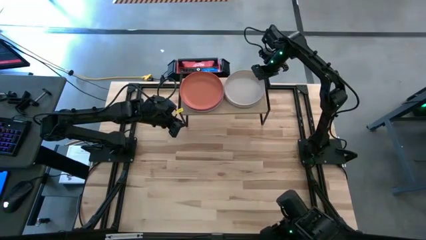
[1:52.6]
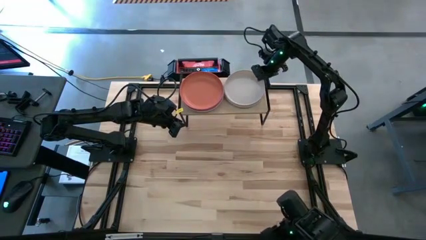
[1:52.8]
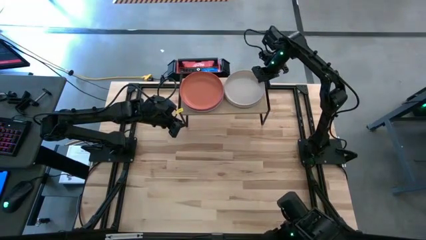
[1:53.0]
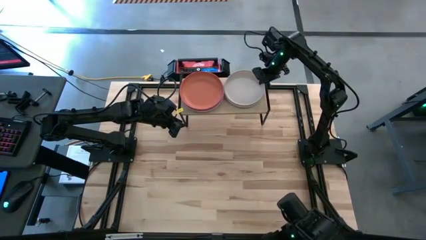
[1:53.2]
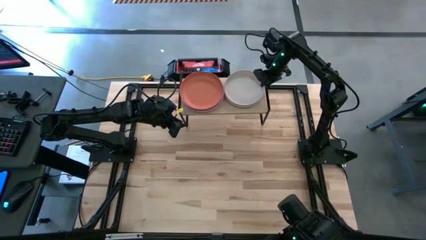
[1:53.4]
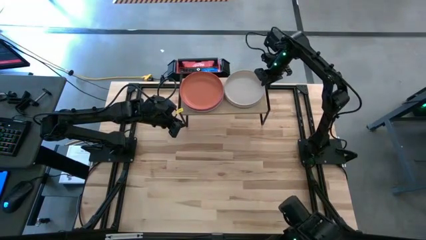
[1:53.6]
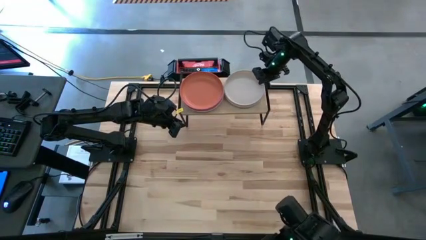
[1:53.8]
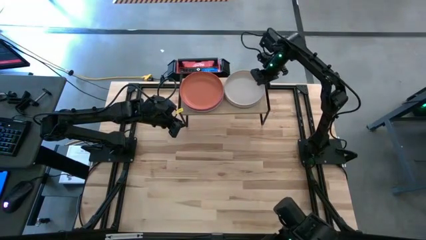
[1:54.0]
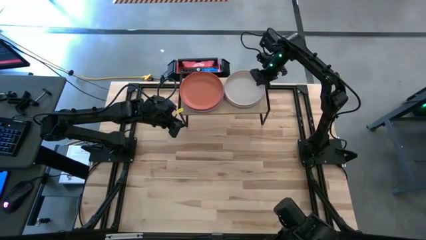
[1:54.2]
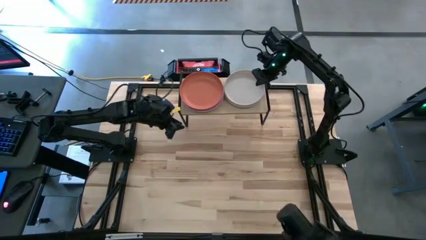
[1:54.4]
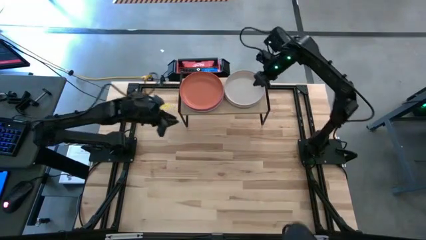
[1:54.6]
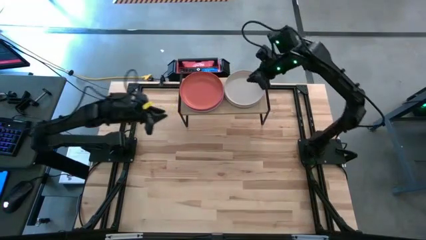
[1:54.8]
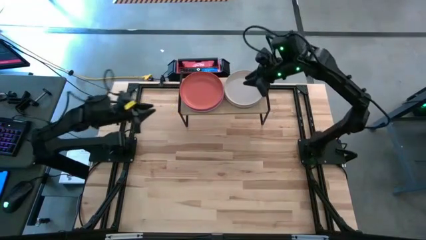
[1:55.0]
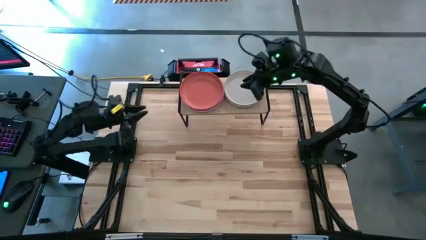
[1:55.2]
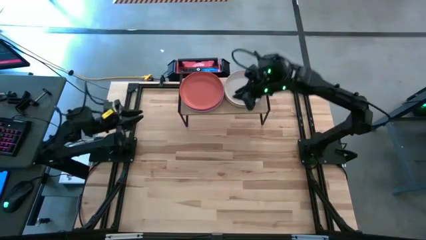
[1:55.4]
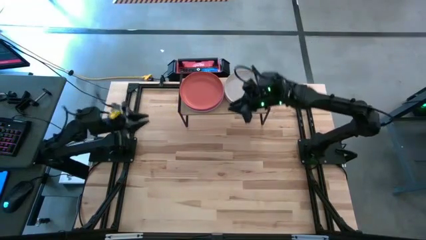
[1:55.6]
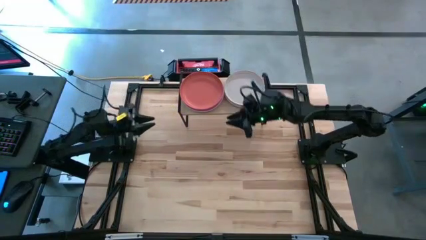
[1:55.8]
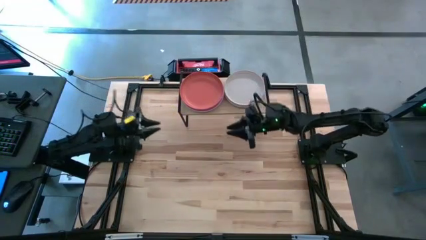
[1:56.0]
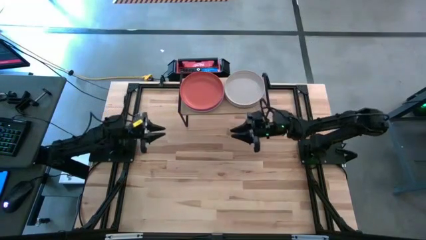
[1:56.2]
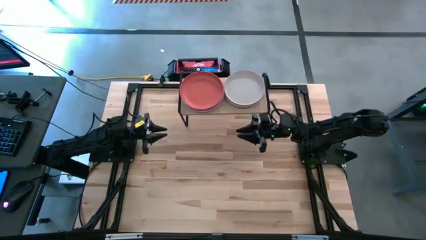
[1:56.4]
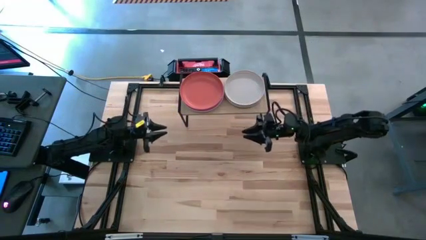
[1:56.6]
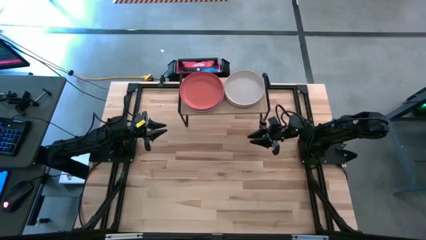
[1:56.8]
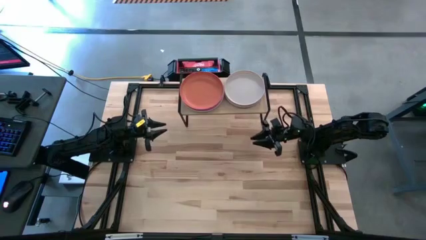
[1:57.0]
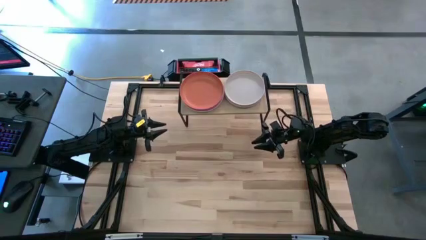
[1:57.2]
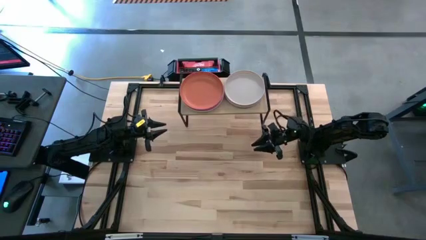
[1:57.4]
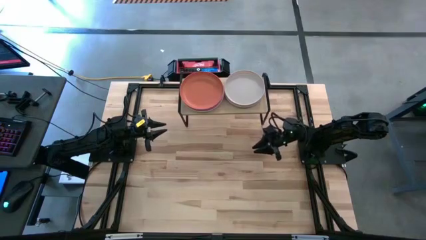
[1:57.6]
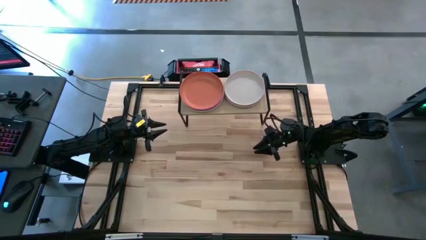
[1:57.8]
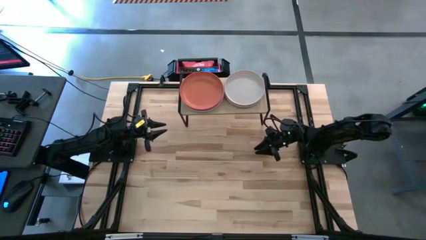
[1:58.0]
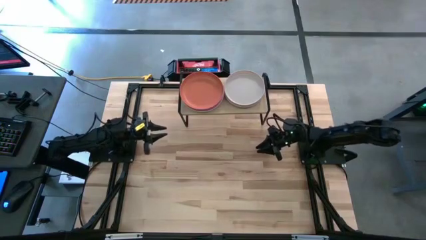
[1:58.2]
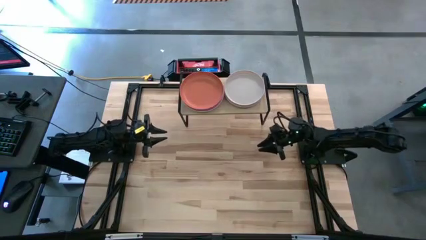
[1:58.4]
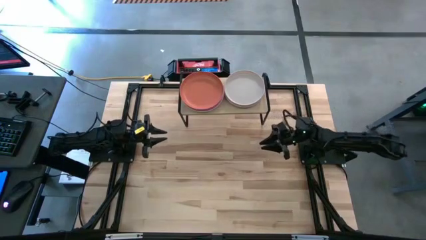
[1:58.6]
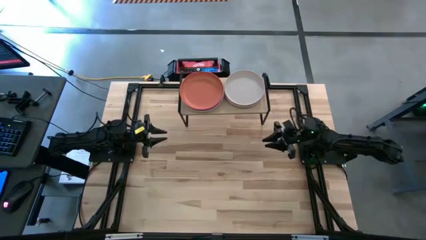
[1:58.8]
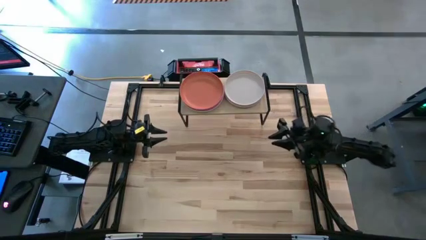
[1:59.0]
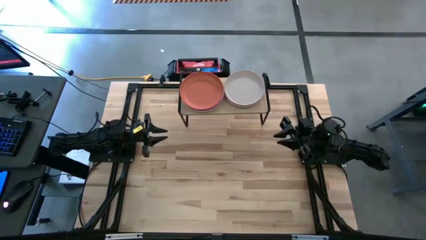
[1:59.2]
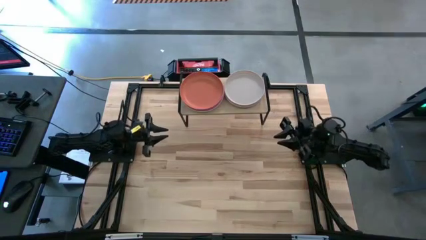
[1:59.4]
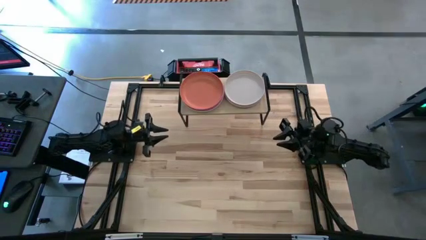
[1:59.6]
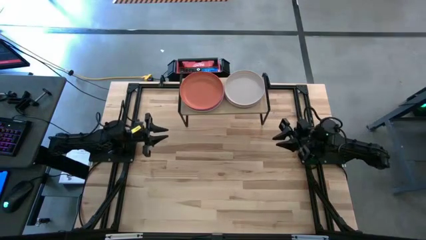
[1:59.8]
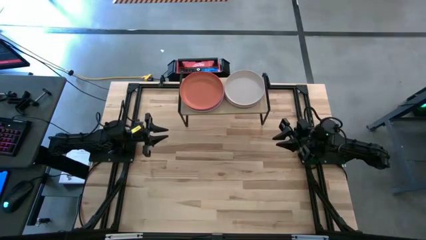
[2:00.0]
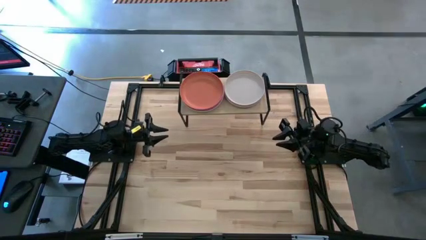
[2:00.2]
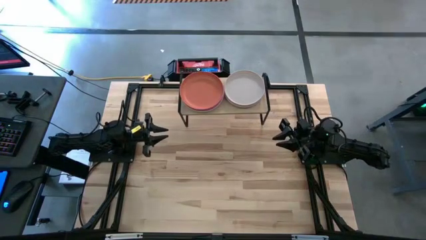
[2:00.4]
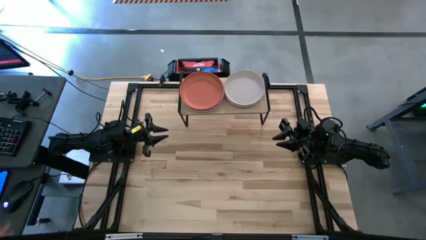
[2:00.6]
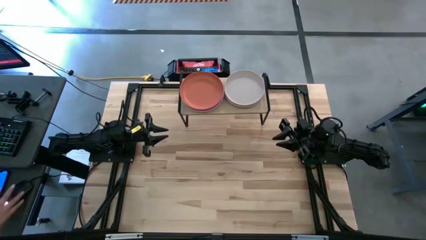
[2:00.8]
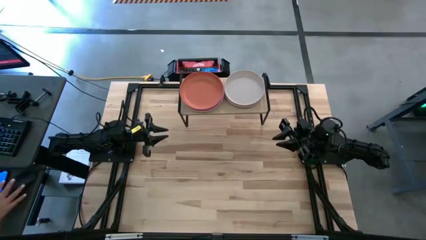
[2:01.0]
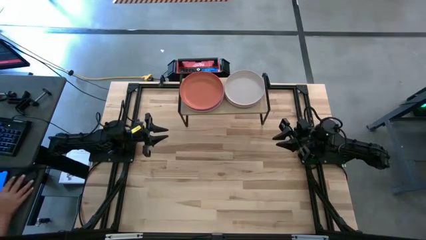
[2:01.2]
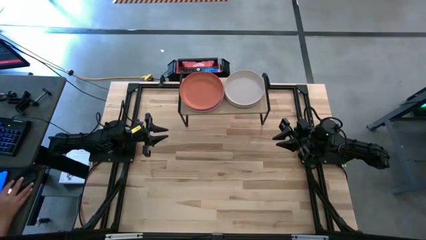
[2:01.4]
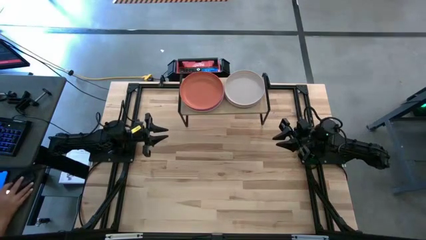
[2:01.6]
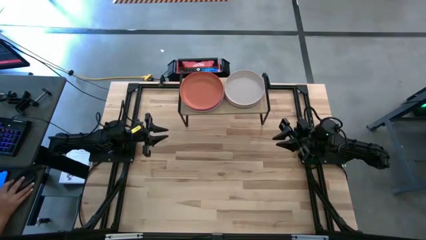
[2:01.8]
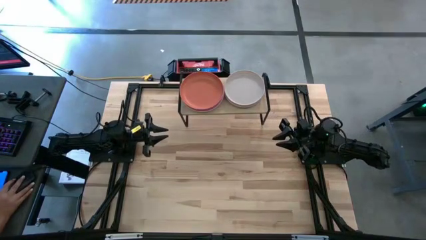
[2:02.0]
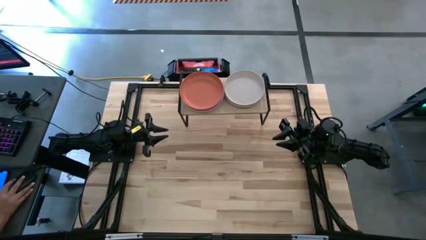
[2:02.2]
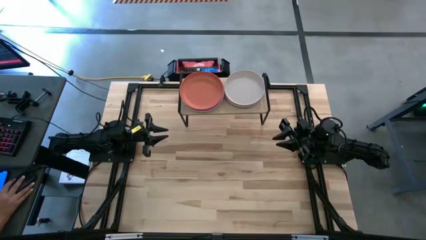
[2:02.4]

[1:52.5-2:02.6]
Task: Place and stack plates onto a shelf
Return to Home Position

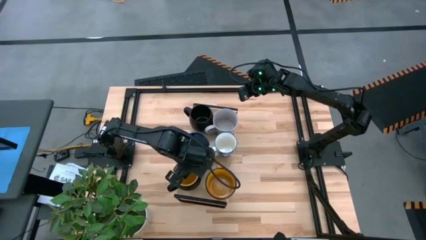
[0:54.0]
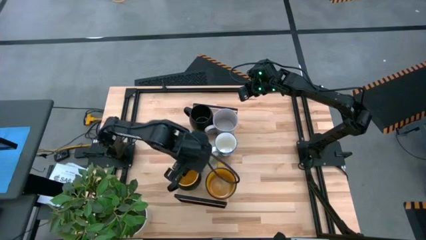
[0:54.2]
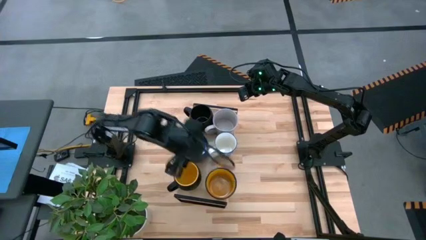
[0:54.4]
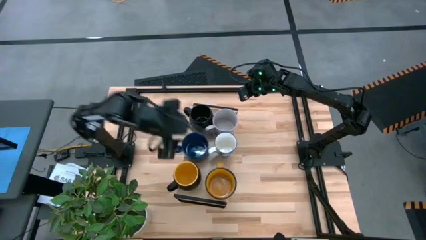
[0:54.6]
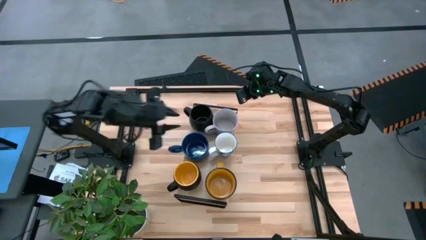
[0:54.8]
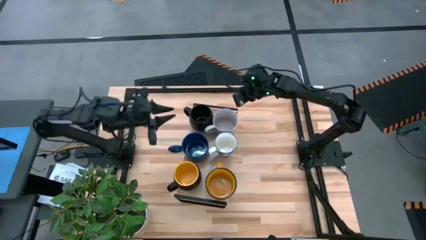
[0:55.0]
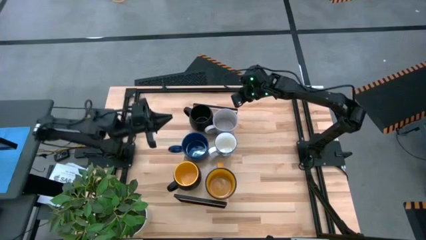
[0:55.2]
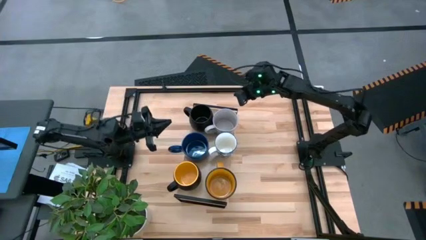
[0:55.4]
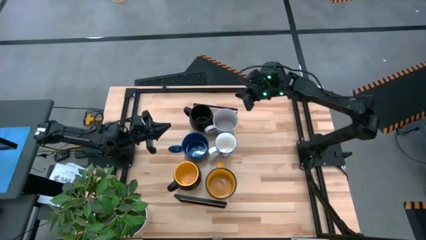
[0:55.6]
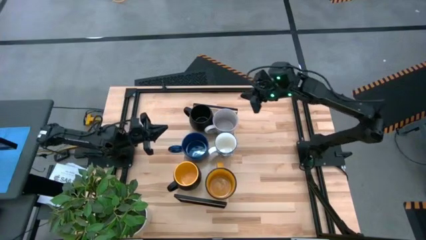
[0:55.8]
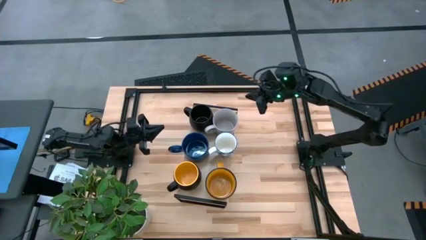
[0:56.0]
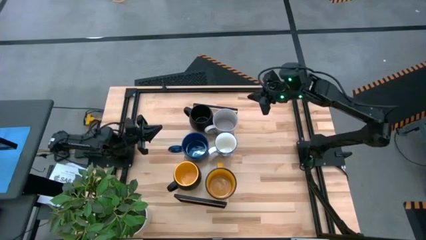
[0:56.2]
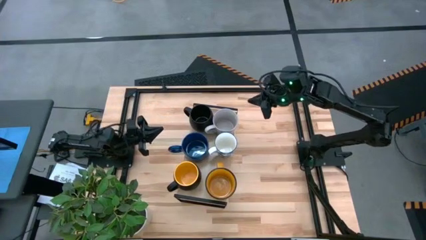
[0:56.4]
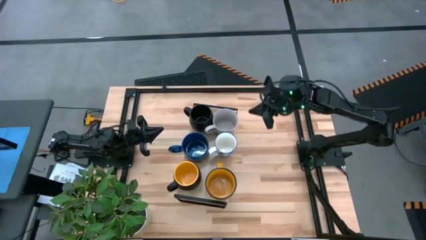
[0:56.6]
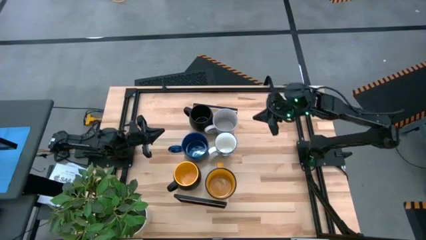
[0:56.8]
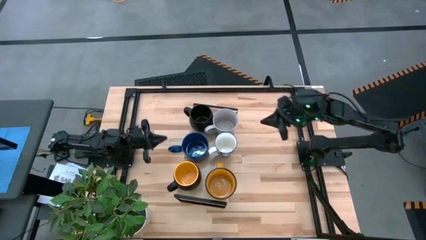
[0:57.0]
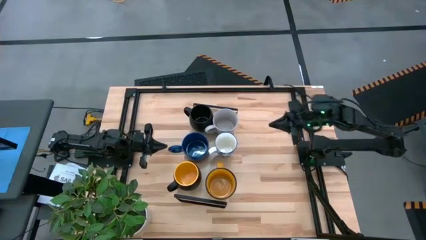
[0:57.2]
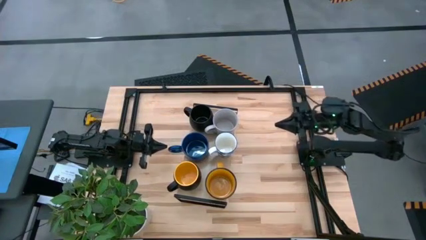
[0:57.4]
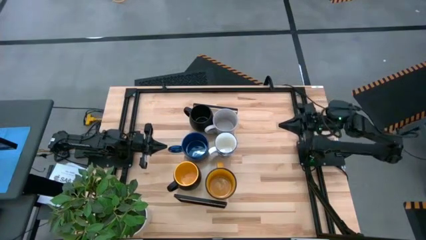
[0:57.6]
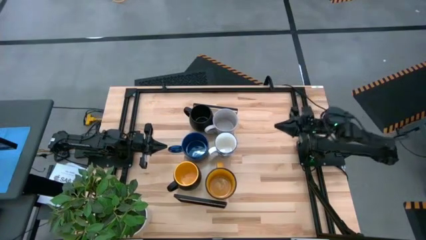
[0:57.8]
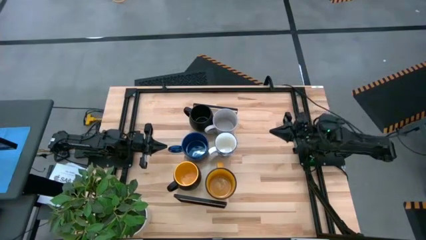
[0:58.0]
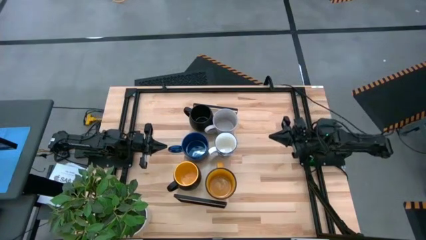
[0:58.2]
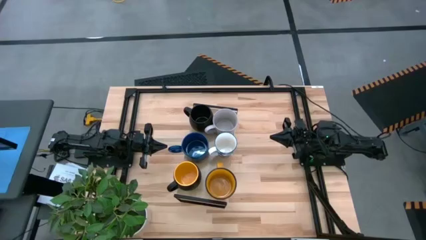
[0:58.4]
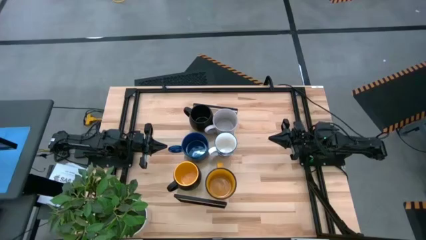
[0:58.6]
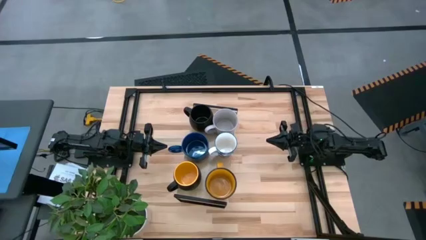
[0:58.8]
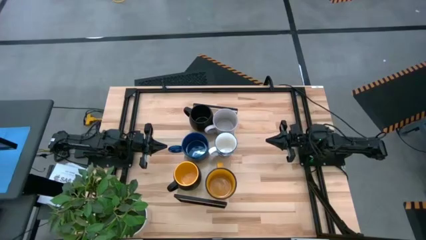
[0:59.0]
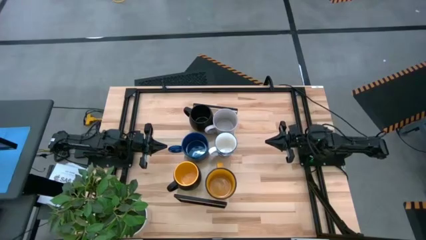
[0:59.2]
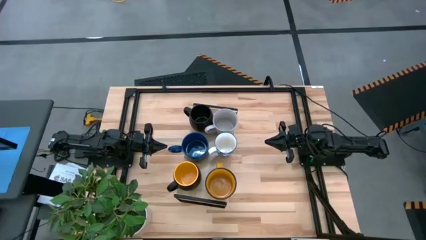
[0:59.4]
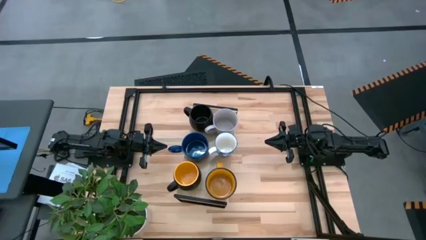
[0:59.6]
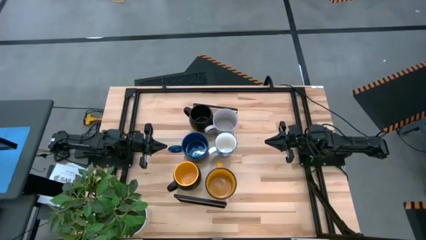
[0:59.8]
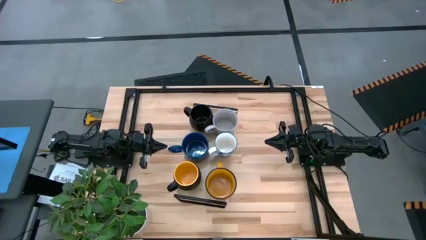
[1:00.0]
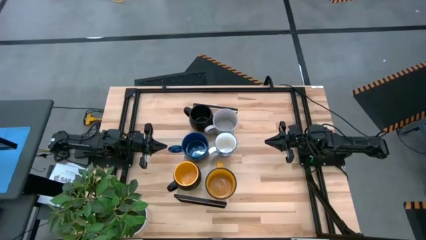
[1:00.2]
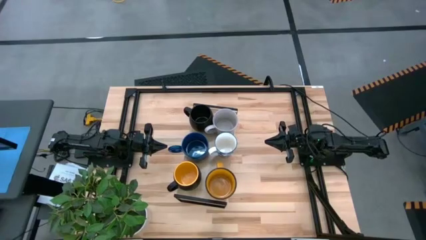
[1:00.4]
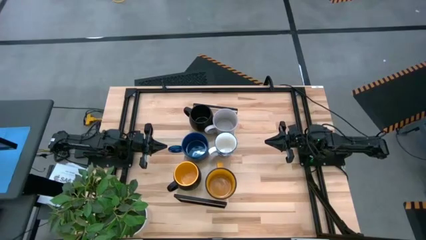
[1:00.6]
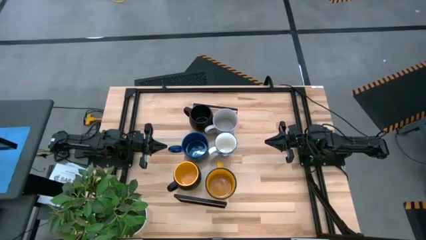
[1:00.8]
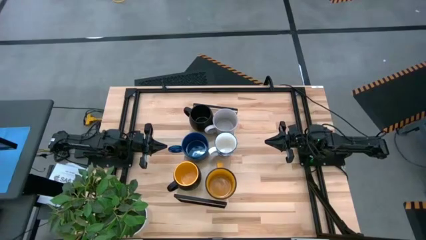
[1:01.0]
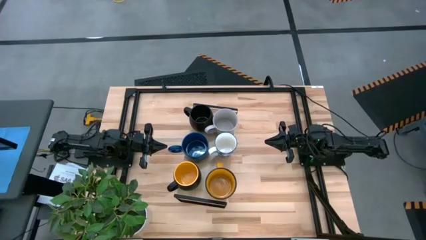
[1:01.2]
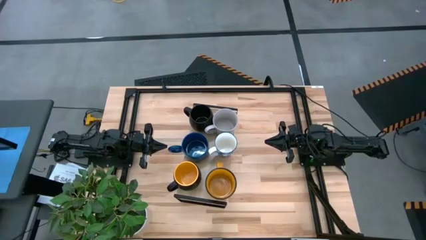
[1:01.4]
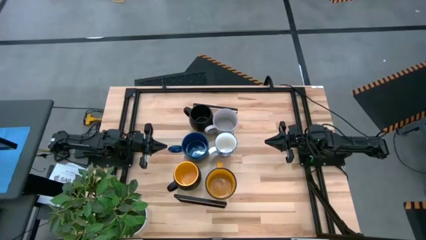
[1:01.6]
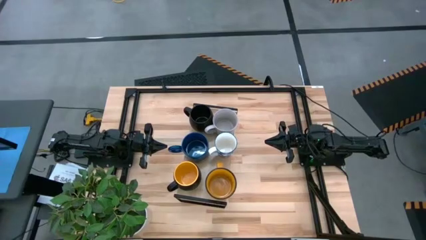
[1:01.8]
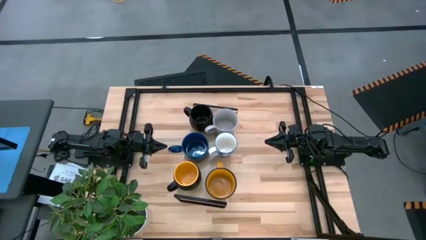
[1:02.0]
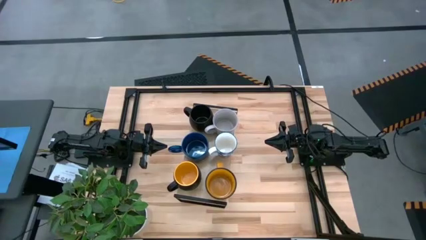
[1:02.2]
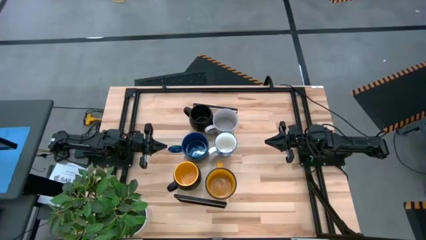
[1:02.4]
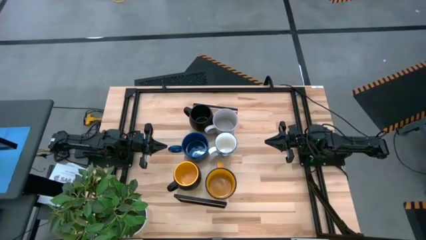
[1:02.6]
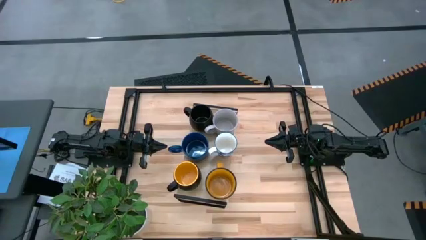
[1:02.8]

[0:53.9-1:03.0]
Task: Place coffee mugs
Return to Home Position
